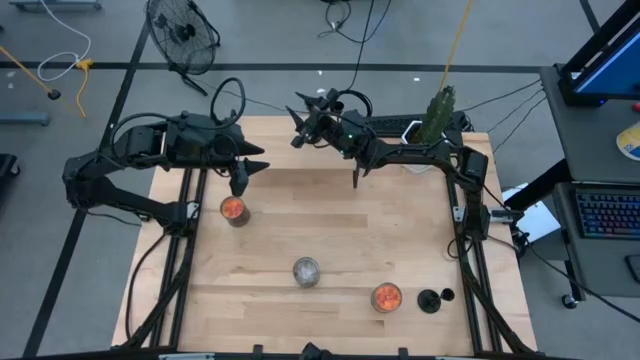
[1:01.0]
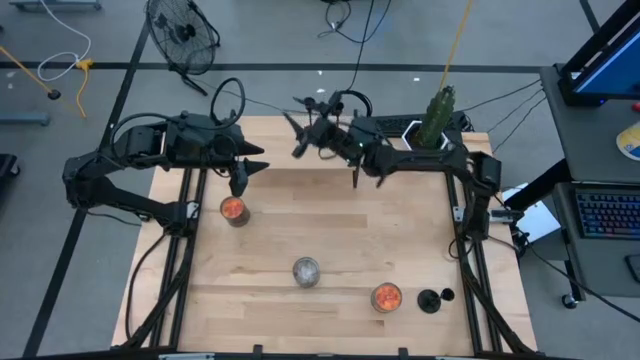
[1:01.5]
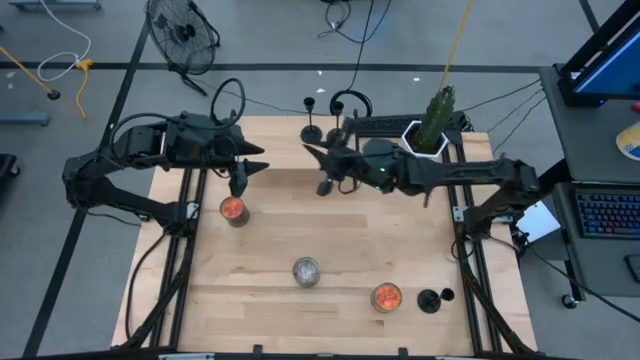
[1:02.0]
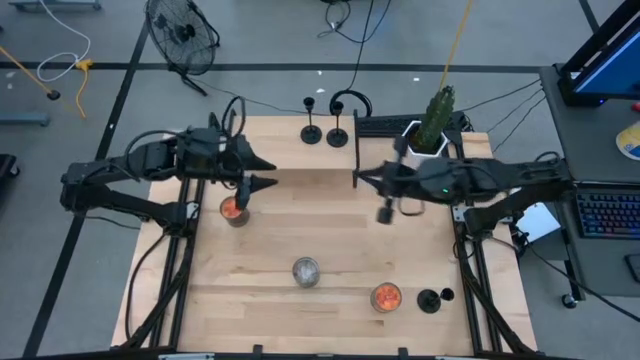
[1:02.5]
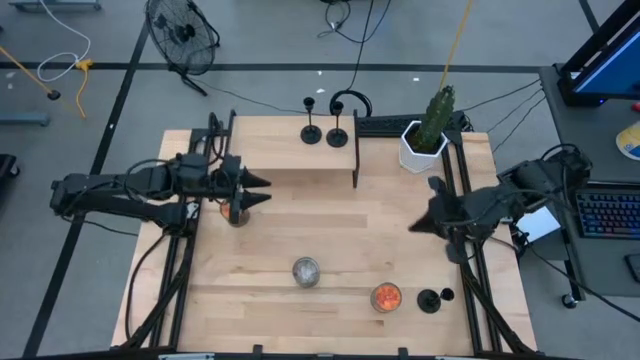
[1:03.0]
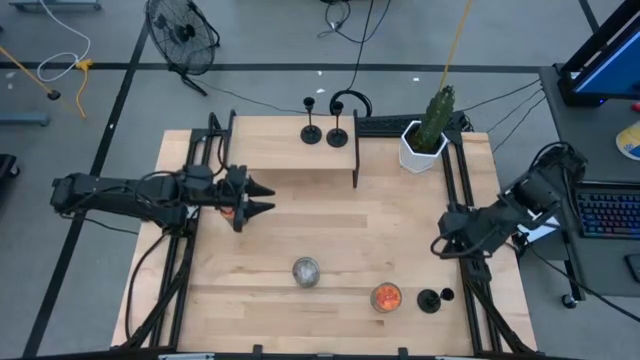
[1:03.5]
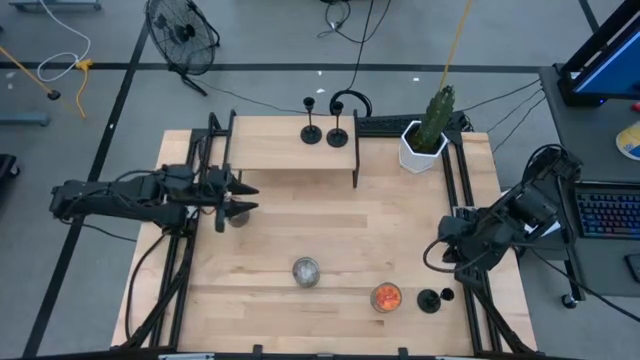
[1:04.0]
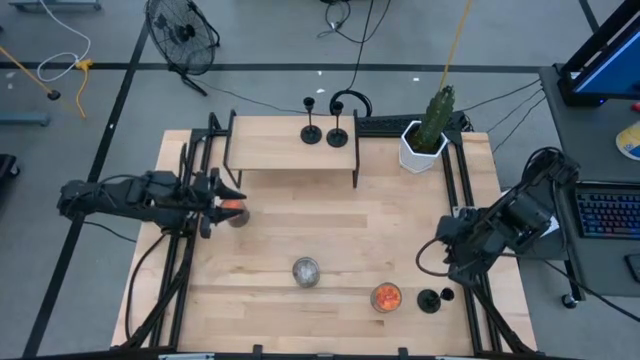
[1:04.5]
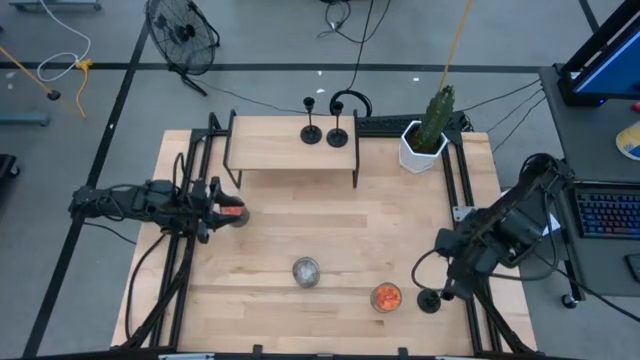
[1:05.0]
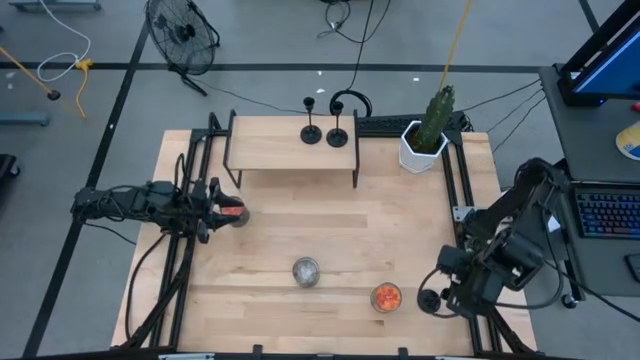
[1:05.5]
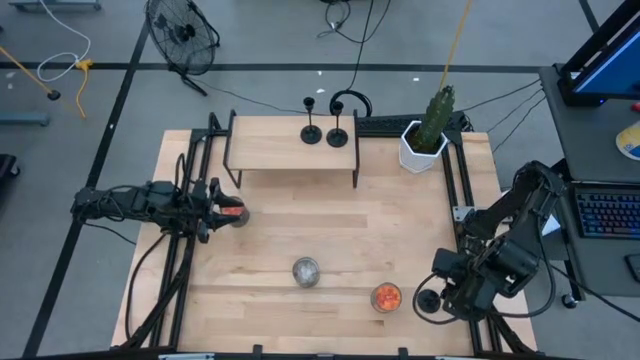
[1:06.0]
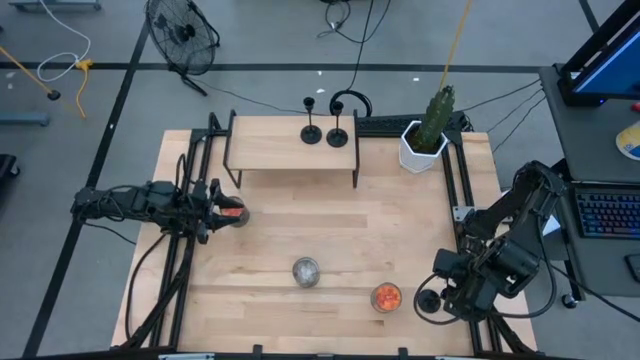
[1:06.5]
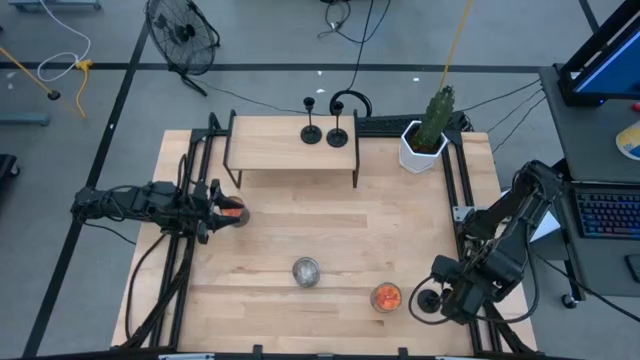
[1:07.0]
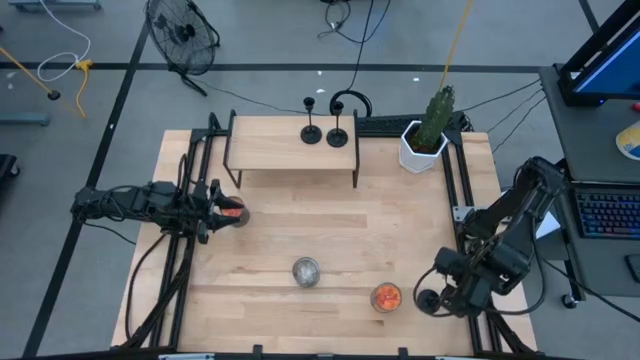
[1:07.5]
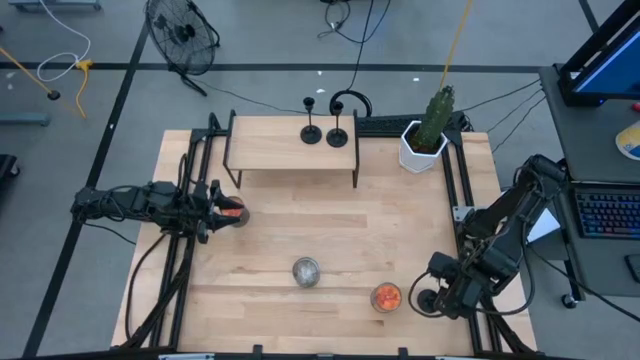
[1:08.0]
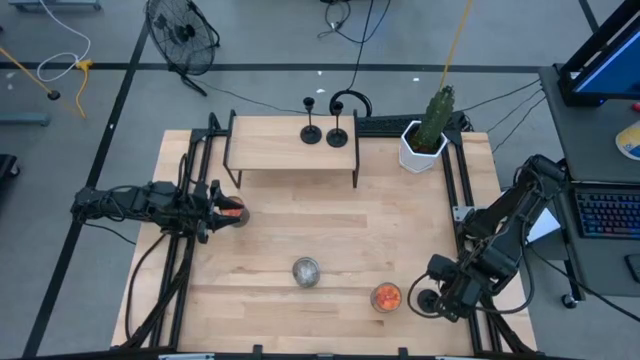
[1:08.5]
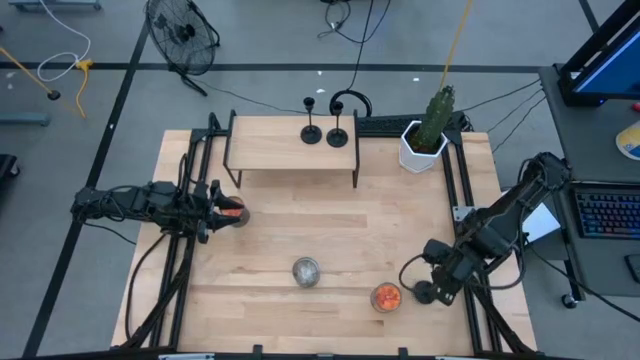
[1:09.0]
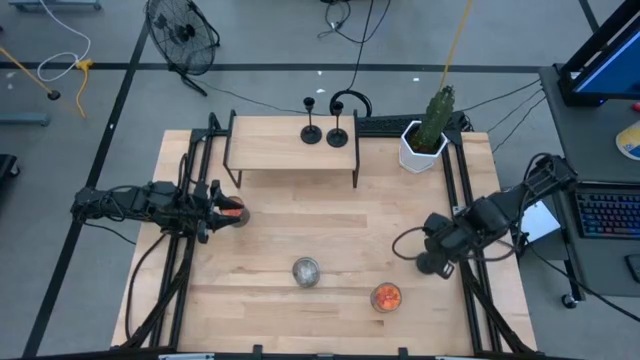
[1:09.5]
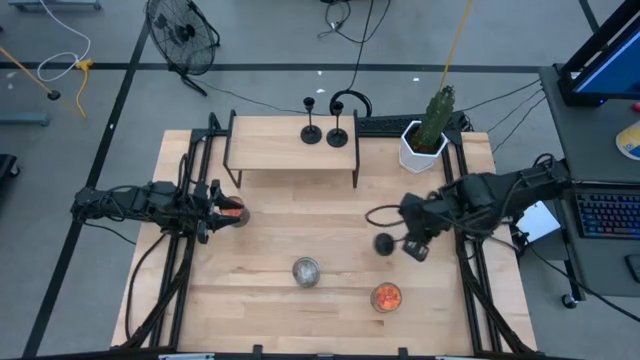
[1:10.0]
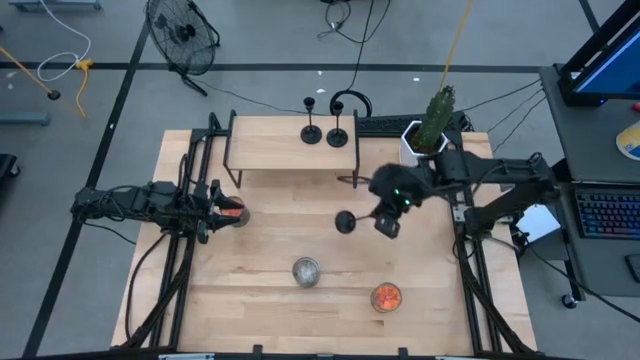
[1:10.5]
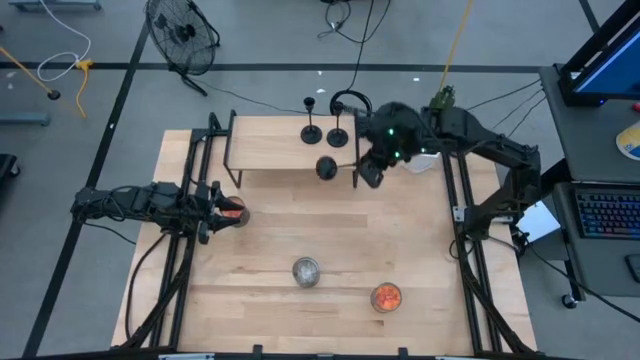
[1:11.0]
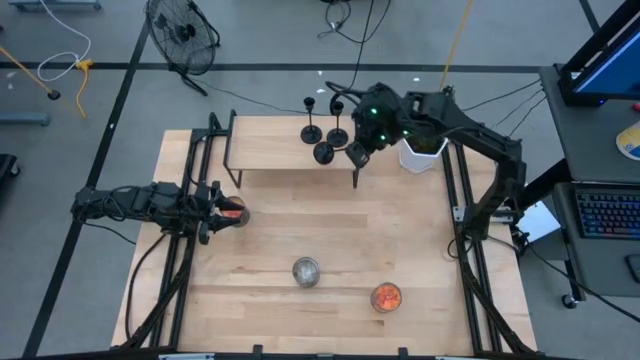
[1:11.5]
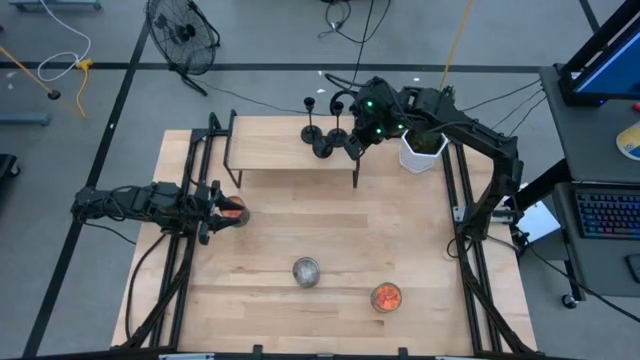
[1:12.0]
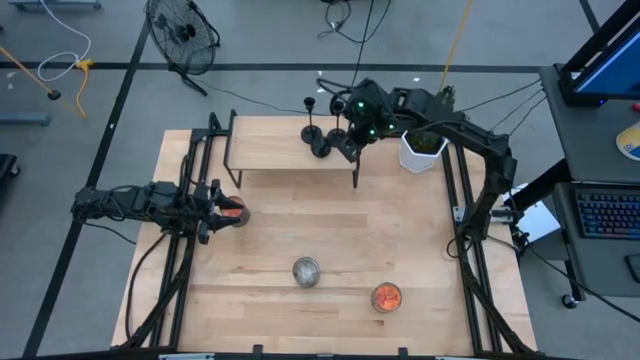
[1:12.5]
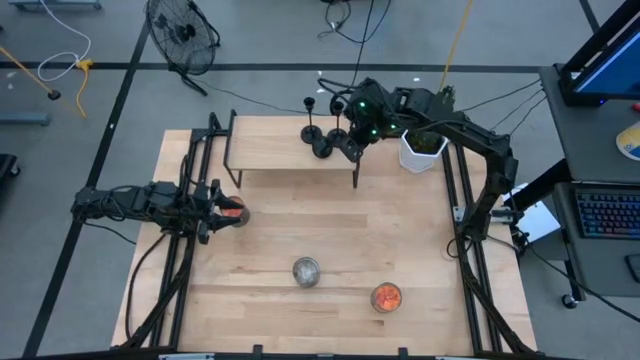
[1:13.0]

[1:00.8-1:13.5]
Task: Pick & Place candle stick holders
Put the black candle holder on the shelf

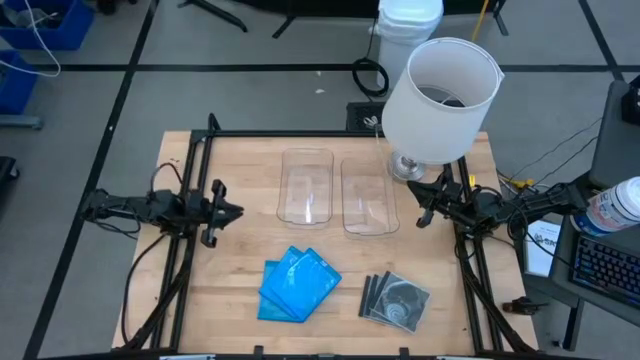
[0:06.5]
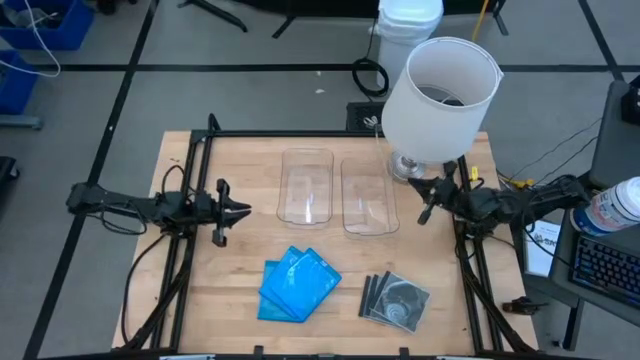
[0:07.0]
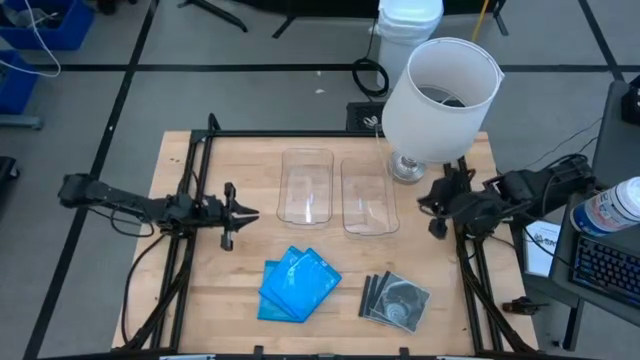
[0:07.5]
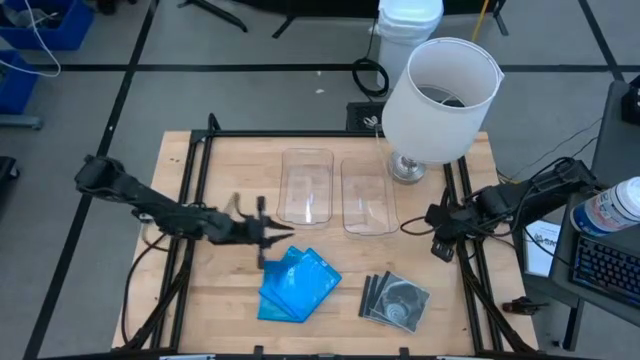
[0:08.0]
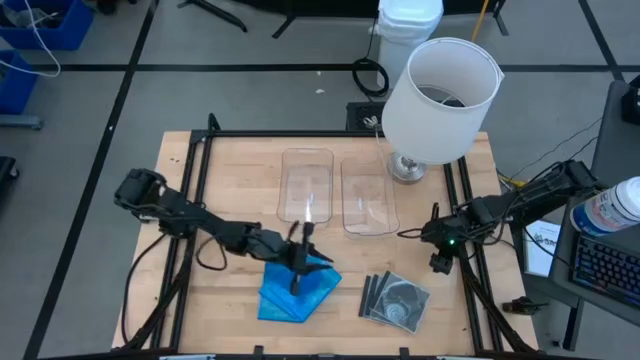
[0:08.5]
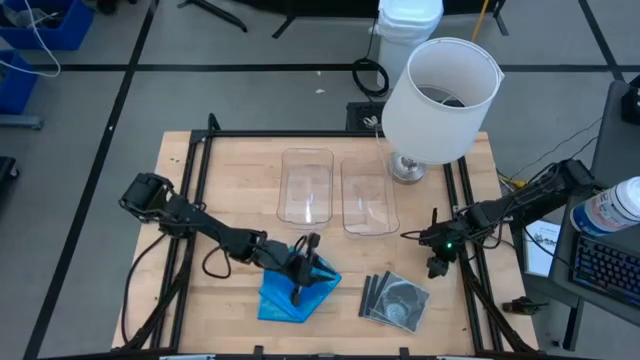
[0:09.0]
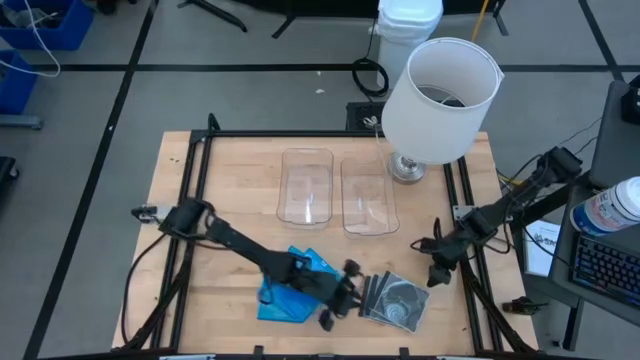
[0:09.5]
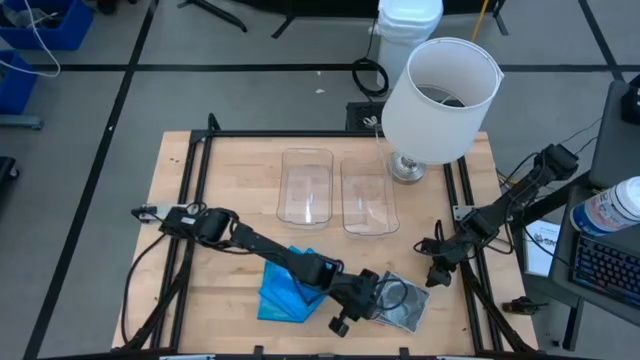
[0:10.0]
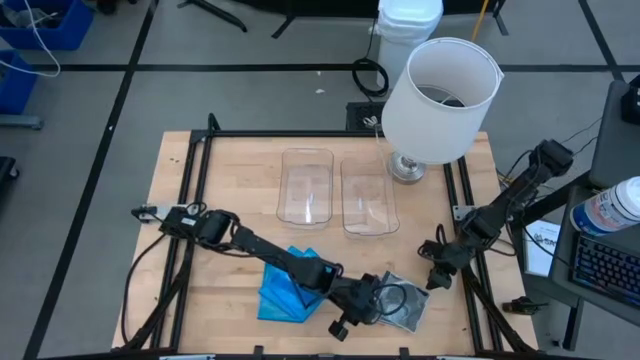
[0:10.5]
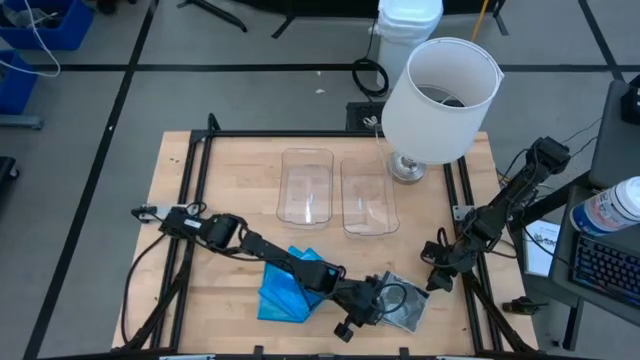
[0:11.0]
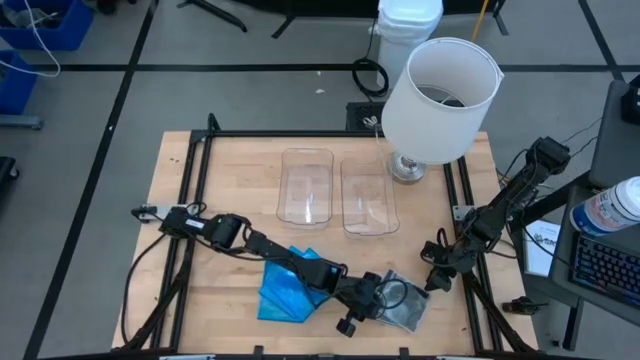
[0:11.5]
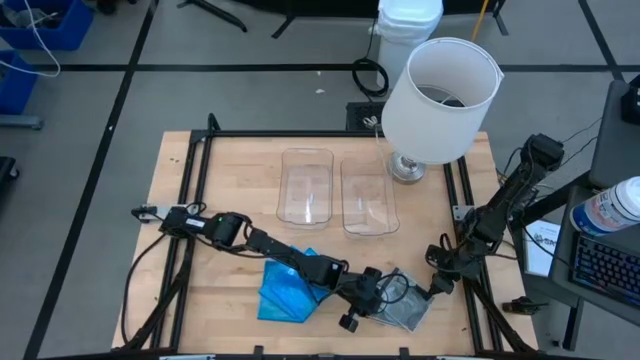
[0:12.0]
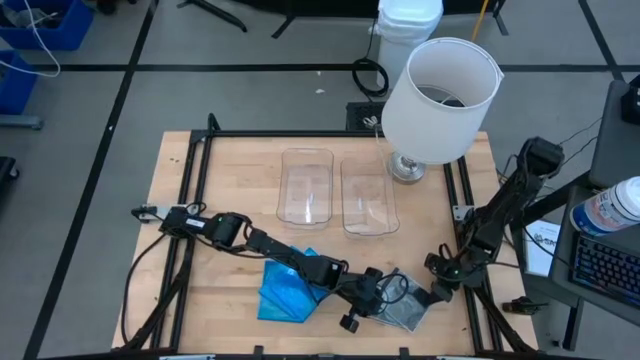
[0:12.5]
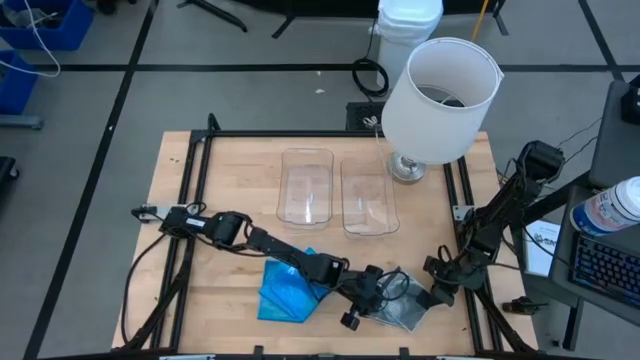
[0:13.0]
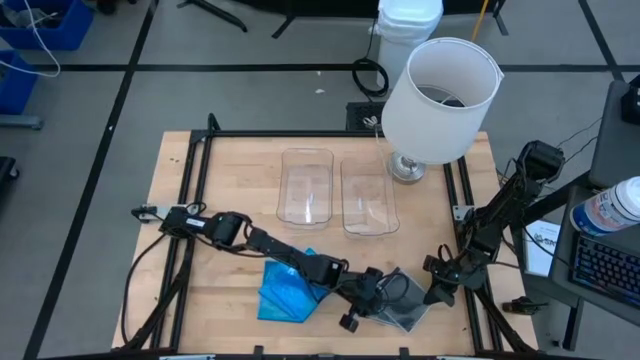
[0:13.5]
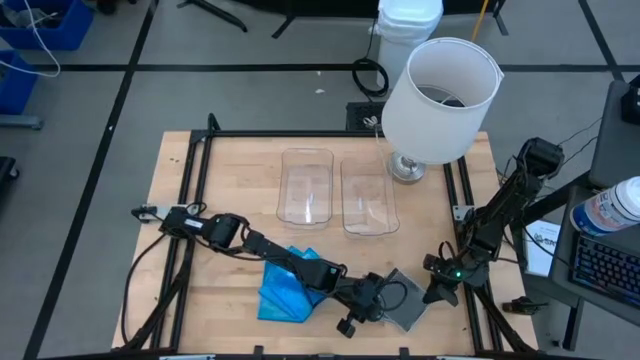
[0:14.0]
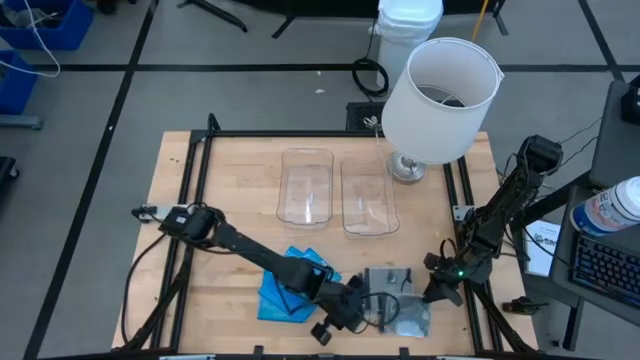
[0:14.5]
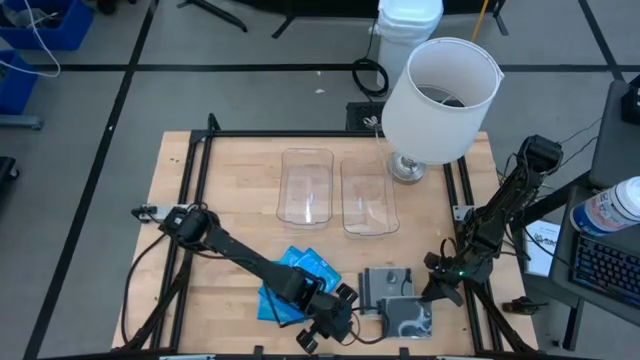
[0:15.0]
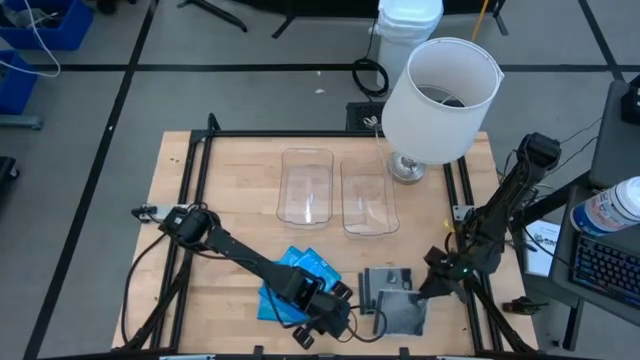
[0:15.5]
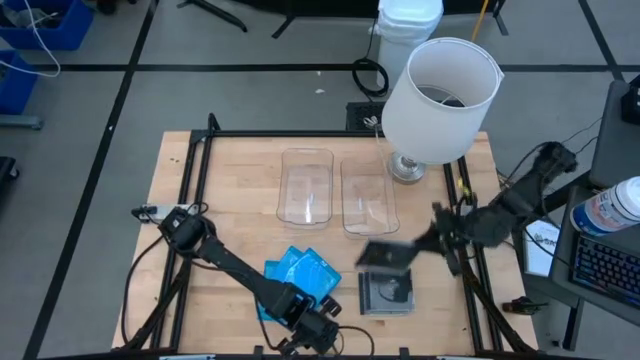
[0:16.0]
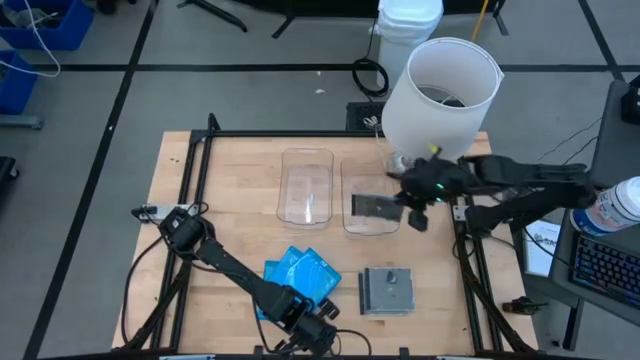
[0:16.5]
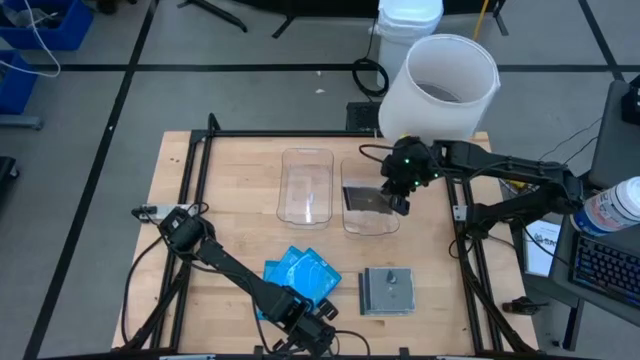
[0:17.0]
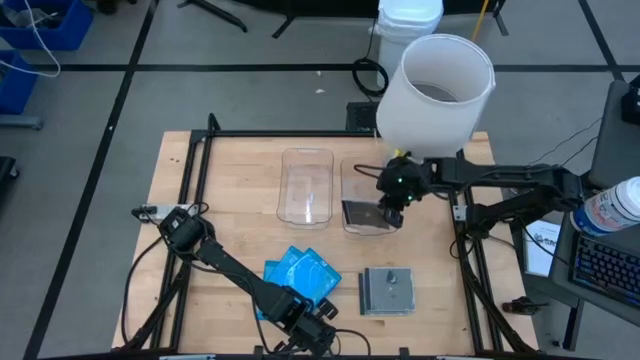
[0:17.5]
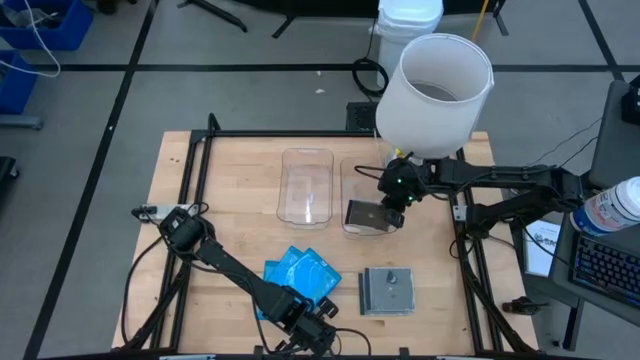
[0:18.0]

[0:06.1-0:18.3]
Task: Pick & place jewel cases by type
Put the black cd case into the right transparent bin
